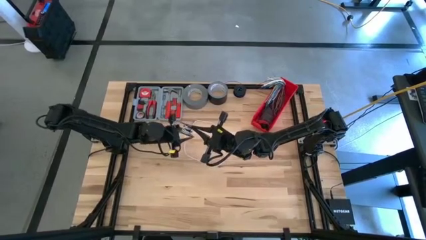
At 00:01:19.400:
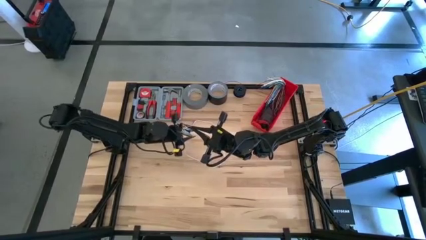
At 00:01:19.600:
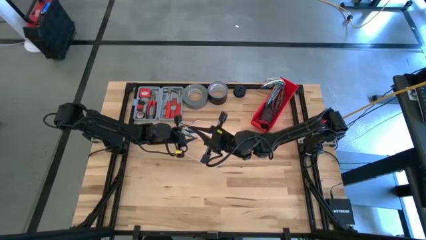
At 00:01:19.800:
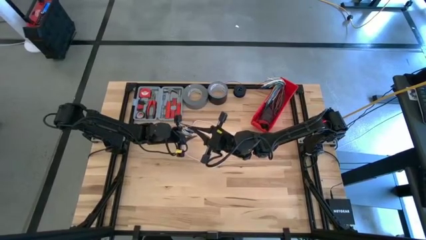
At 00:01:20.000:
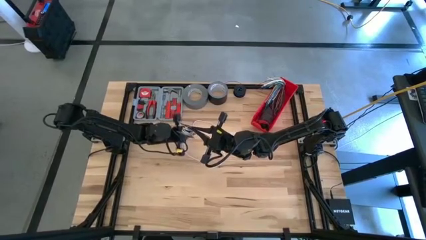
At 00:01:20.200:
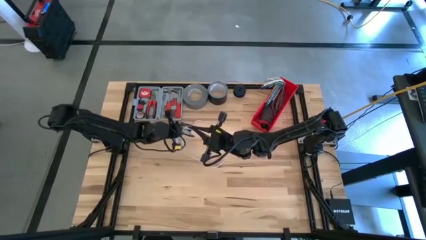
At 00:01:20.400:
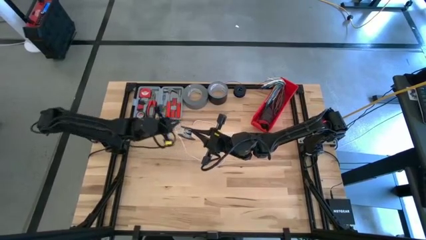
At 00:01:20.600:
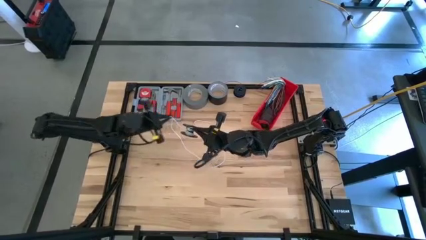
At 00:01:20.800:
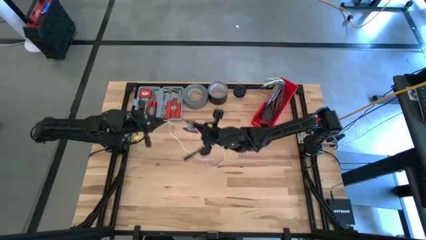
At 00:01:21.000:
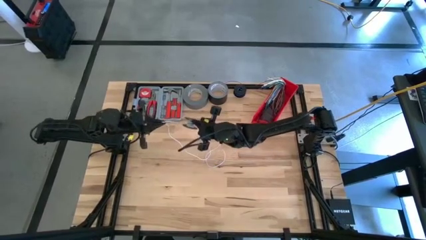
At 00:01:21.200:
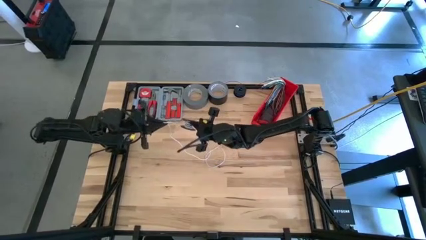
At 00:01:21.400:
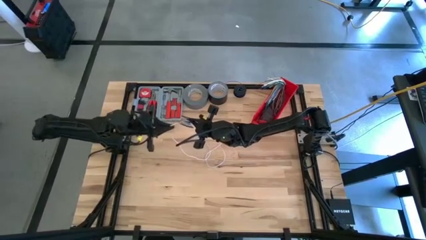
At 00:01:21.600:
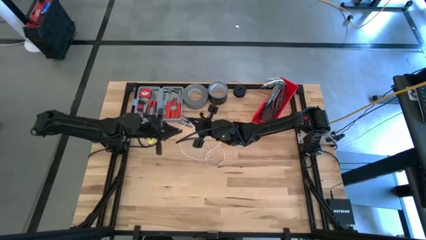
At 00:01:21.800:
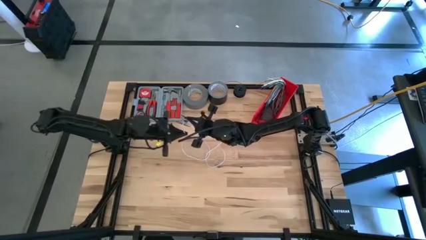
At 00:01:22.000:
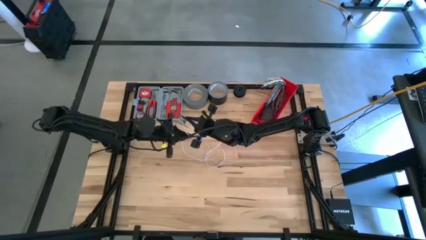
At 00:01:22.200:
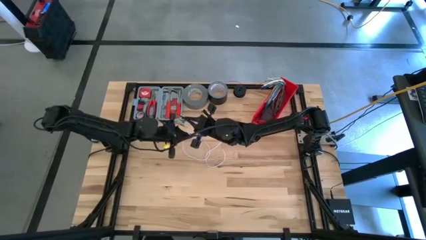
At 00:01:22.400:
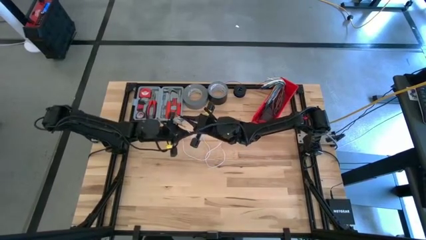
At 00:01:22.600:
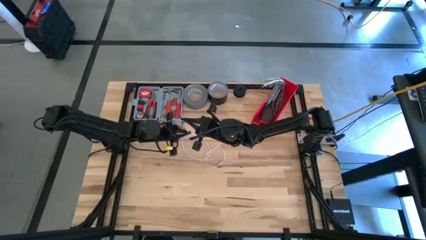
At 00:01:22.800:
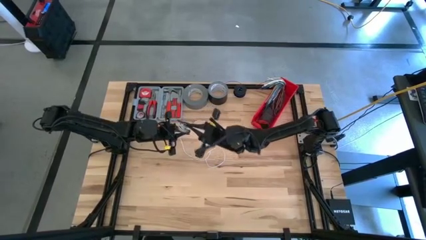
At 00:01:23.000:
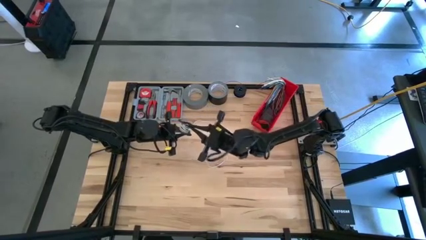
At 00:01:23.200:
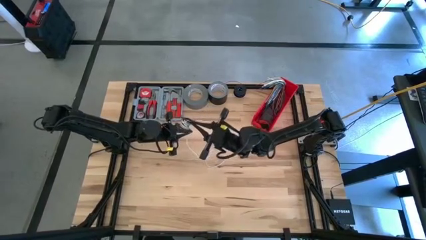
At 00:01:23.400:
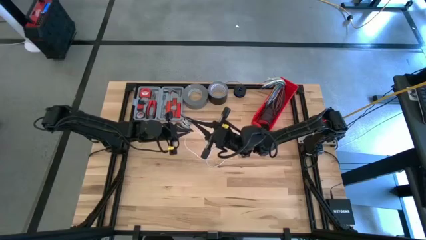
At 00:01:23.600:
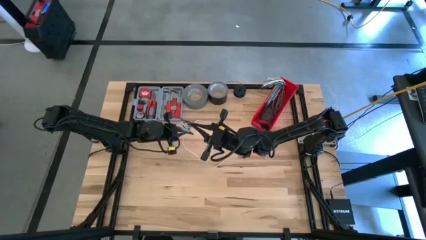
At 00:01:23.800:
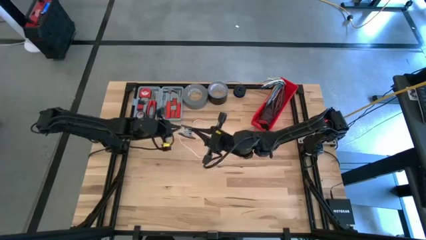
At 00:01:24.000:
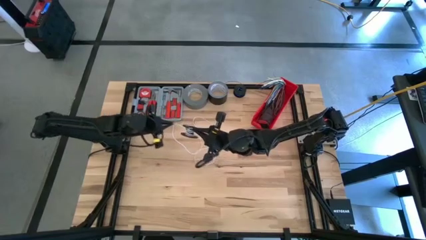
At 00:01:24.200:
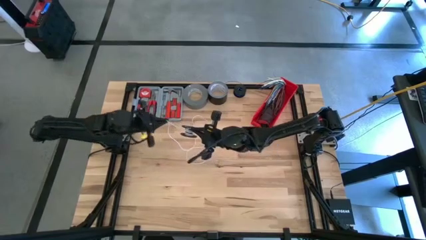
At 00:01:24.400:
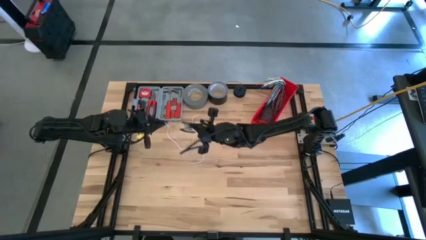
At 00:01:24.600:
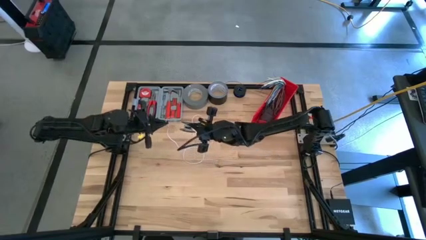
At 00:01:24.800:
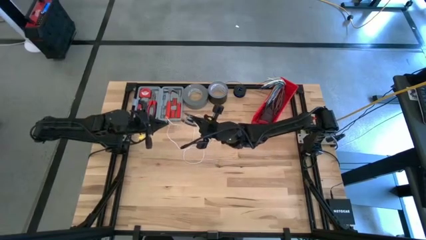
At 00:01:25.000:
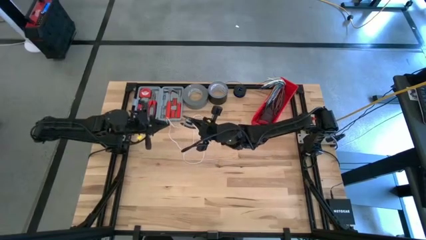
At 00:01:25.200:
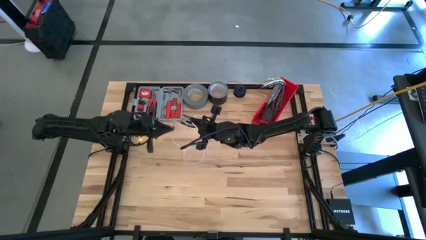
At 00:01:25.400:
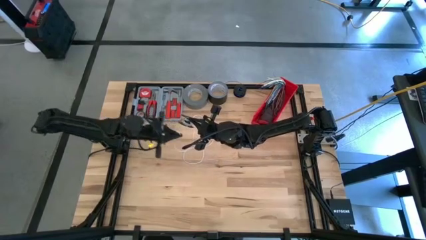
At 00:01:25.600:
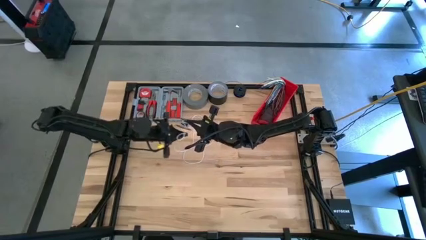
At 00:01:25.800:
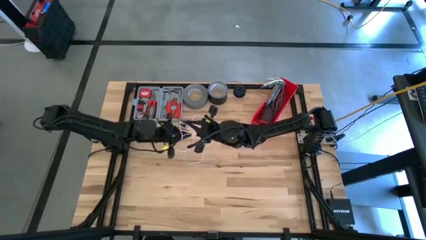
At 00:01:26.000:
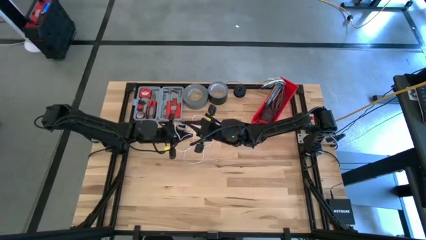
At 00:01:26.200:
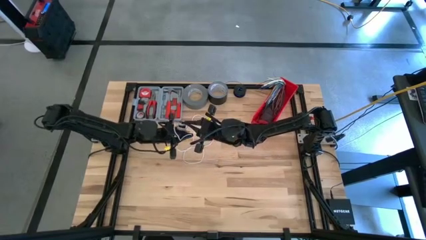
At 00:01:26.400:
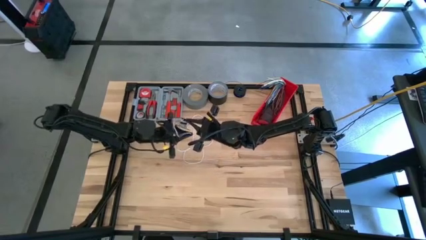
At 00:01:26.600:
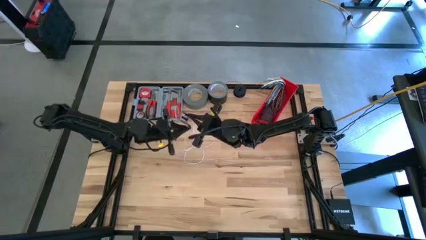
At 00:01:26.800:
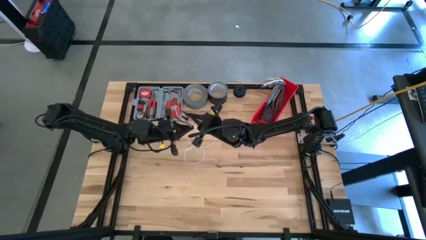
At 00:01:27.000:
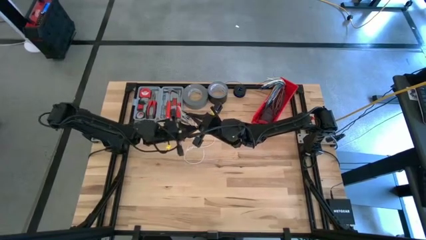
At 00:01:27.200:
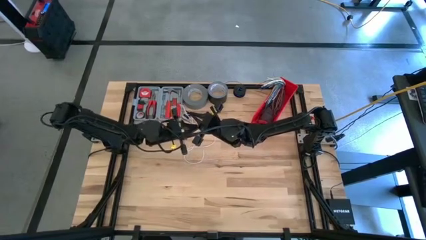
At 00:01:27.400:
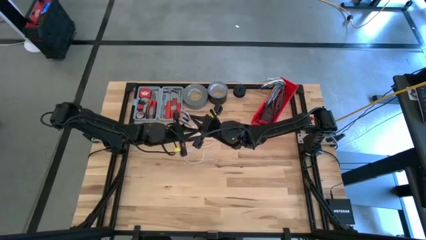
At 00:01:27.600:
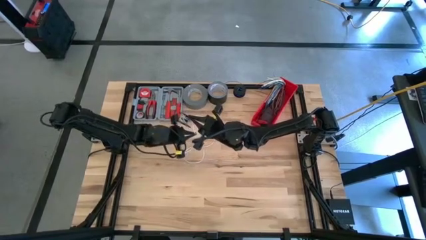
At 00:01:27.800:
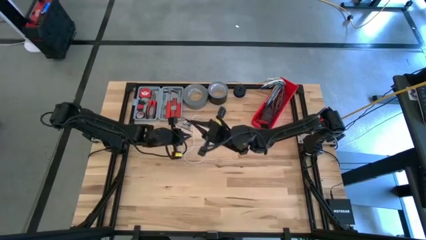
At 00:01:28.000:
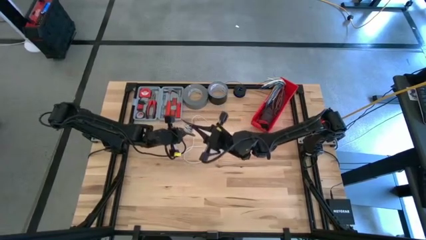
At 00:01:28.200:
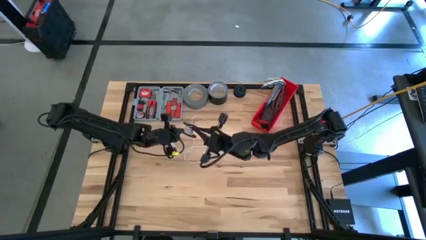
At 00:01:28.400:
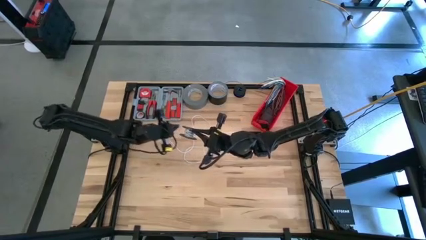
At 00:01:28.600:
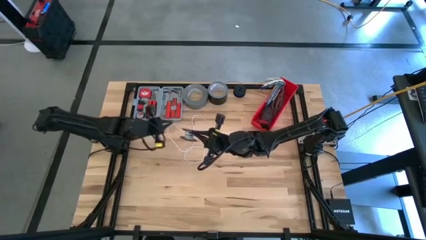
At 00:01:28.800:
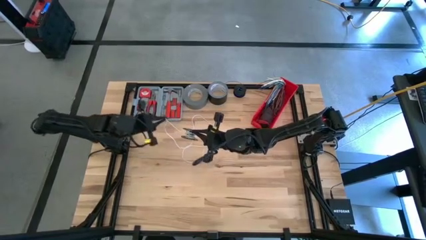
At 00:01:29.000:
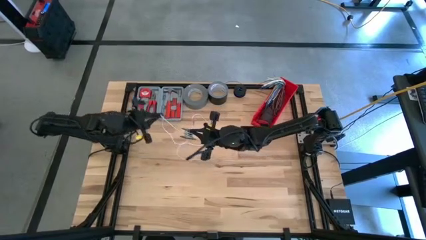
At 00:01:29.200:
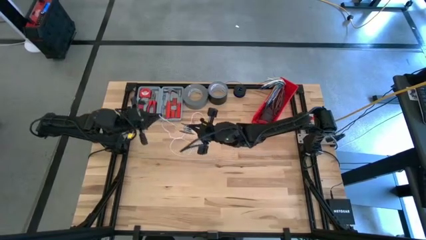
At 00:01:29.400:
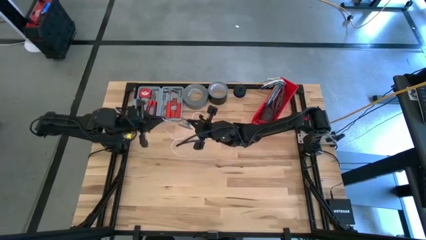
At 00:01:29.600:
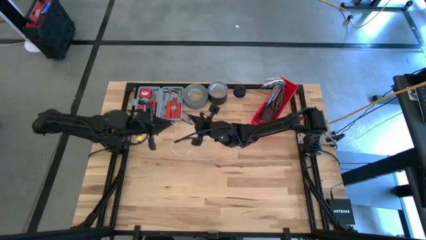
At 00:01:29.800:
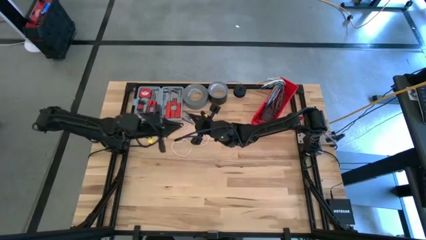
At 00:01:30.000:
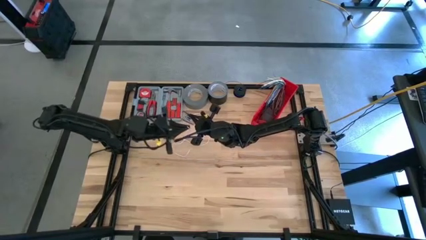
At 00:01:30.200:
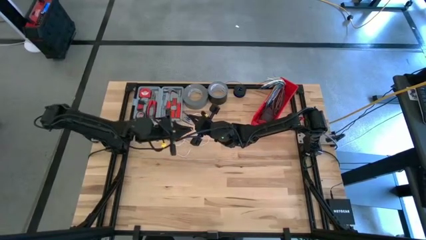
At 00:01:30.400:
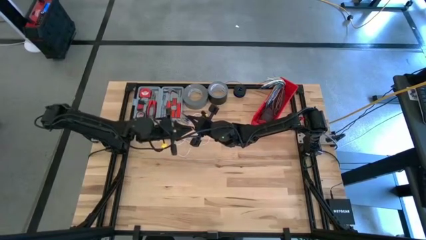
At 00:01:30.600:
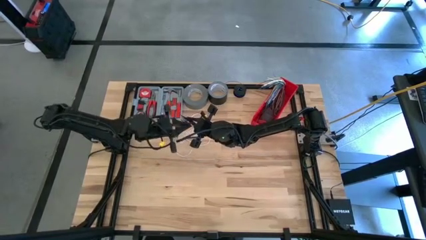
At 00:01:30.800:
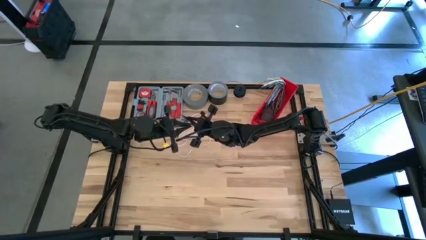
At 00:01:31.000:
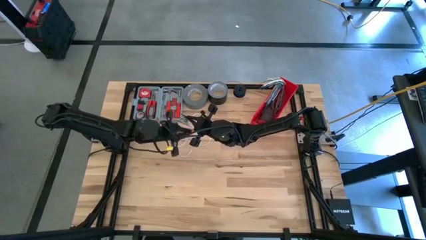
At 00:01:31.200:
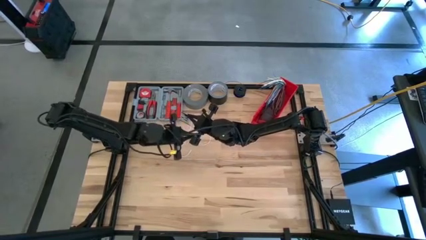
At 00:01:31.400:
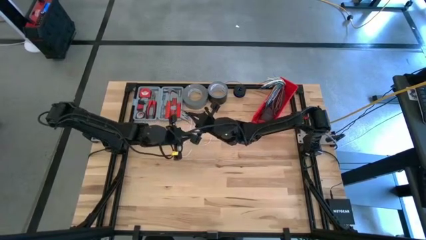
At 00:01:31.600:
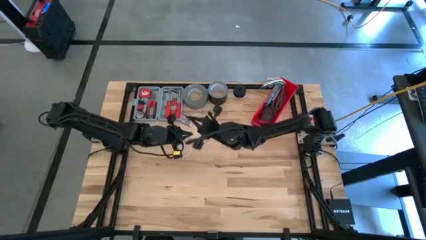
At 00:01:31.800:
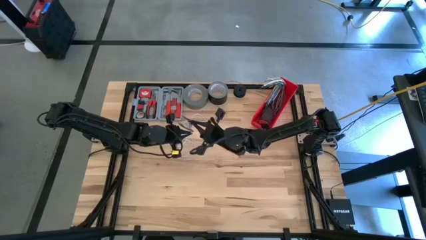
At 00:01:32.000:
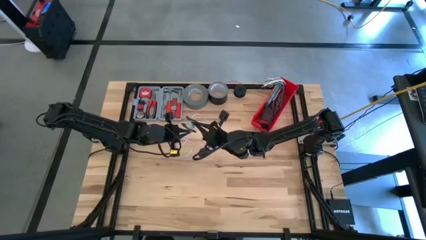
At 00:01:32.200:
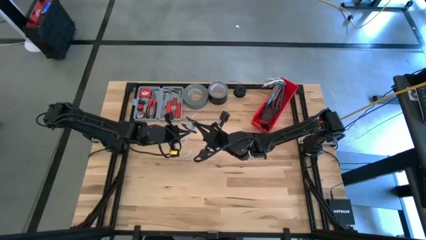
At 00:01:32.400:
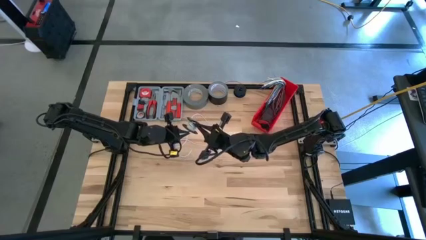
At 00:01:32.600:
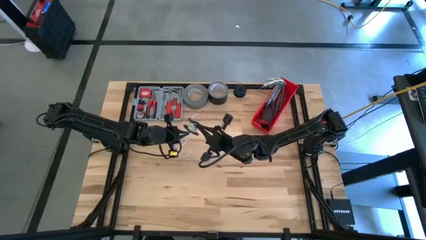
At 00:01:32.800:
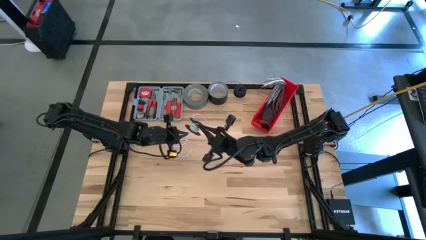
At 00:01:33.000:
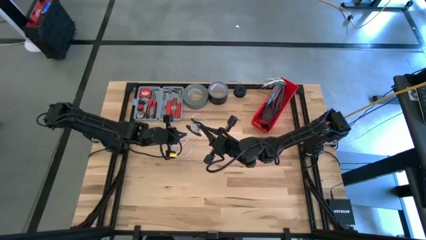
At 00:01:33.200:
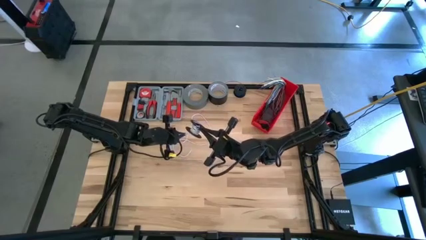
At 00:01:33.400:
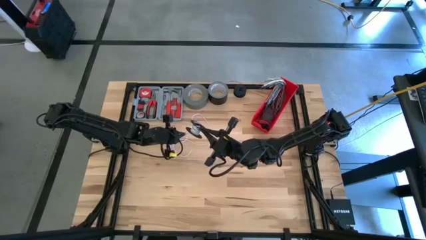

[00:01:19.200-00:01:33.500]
Task: Coil cords
Coil the white wire on the black spool
